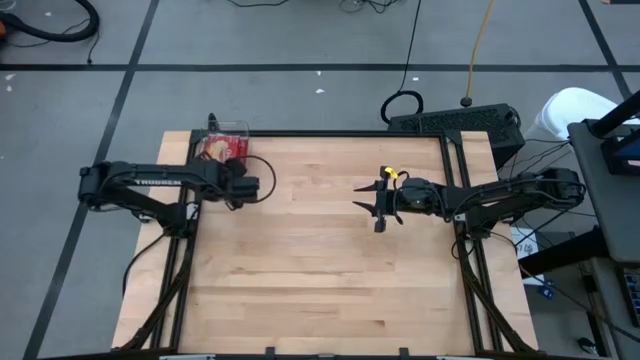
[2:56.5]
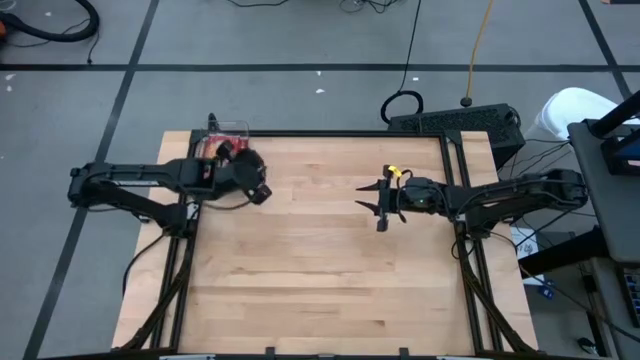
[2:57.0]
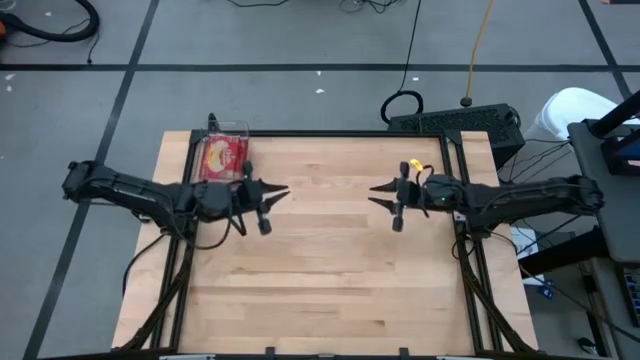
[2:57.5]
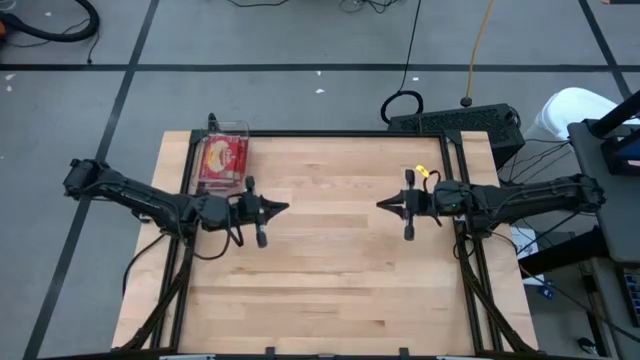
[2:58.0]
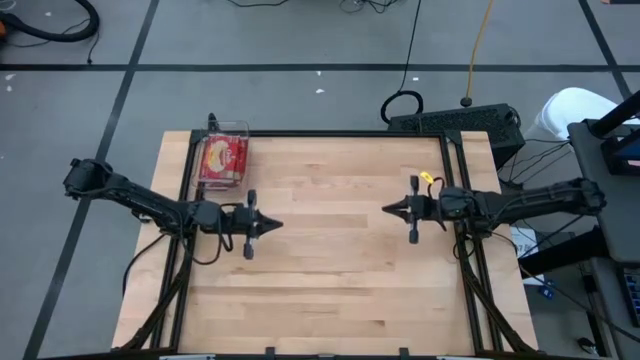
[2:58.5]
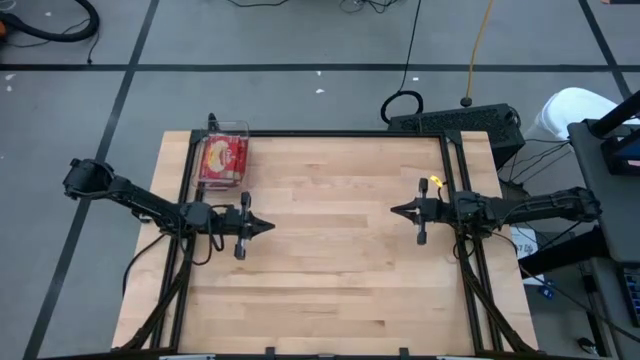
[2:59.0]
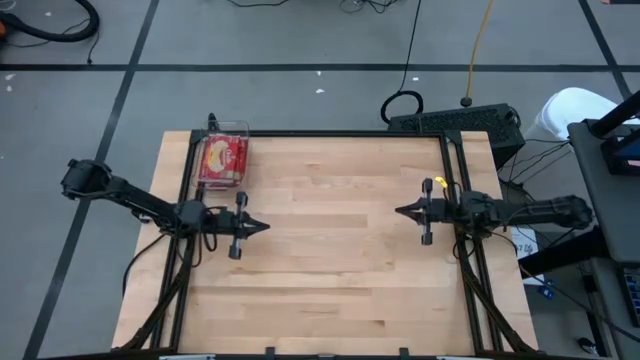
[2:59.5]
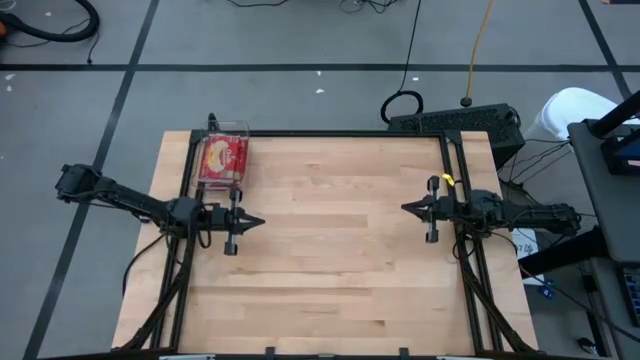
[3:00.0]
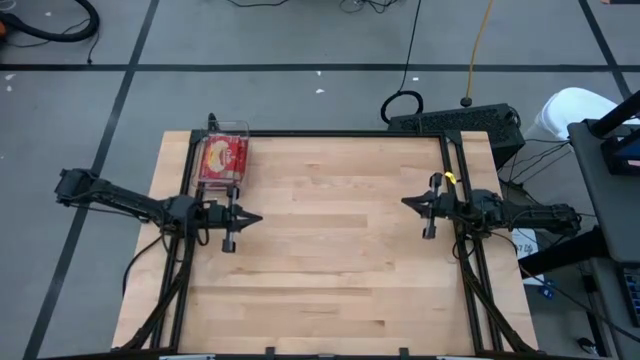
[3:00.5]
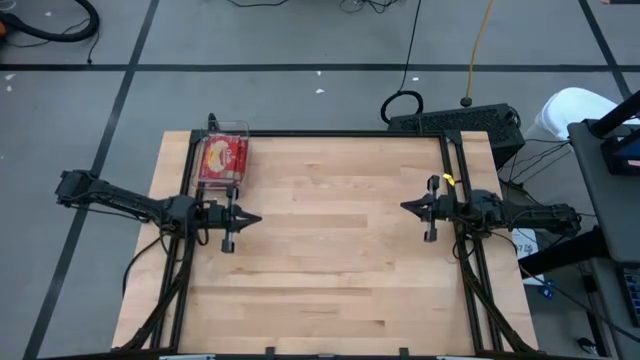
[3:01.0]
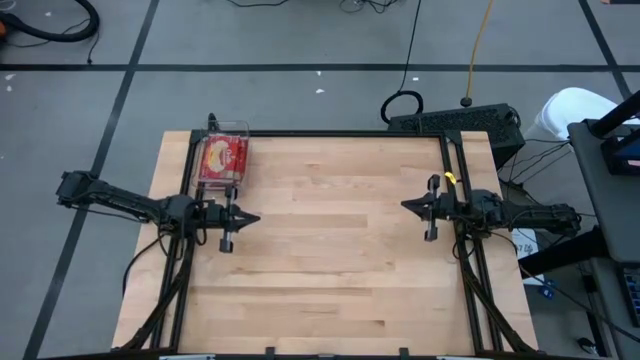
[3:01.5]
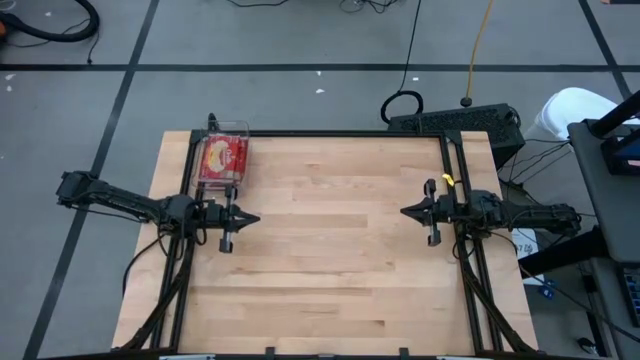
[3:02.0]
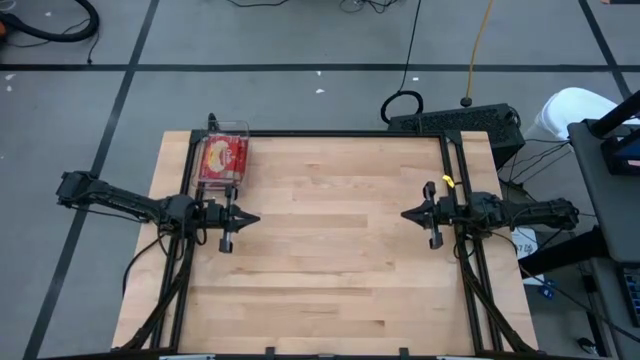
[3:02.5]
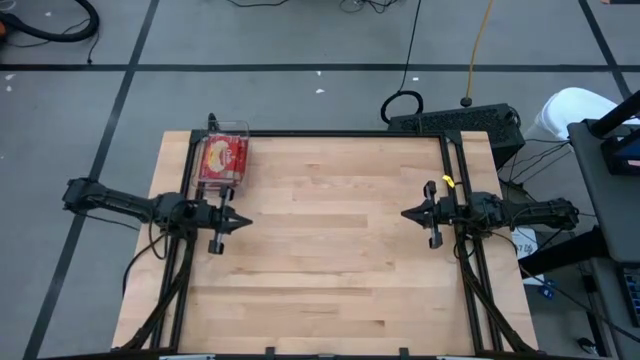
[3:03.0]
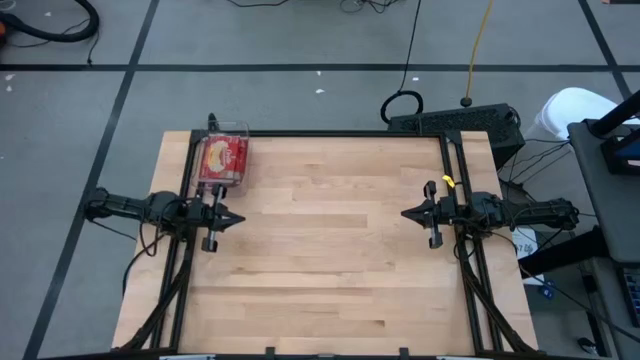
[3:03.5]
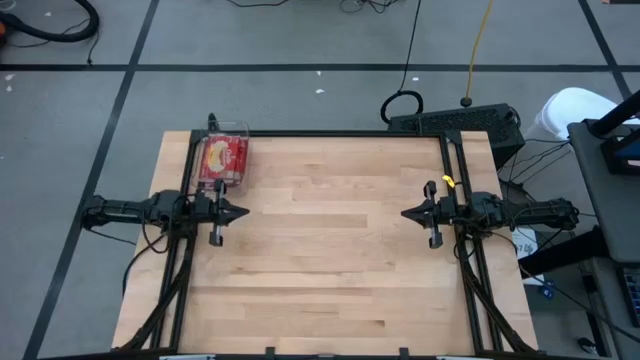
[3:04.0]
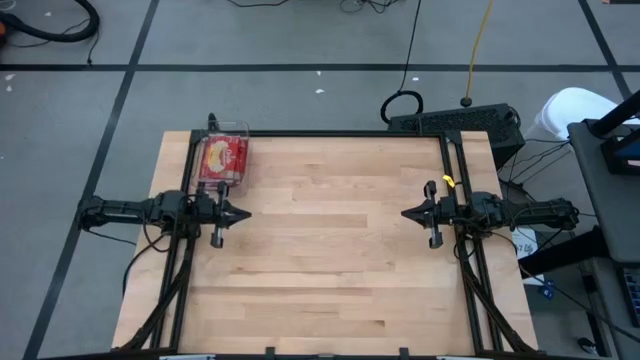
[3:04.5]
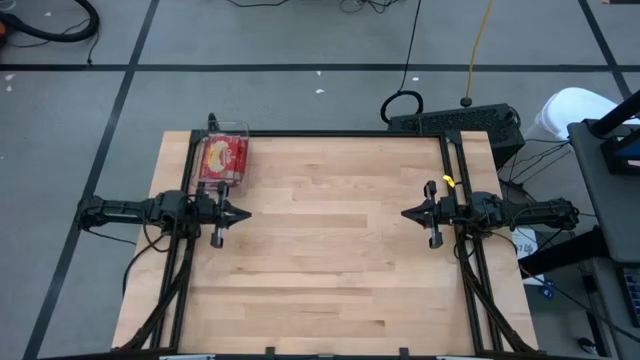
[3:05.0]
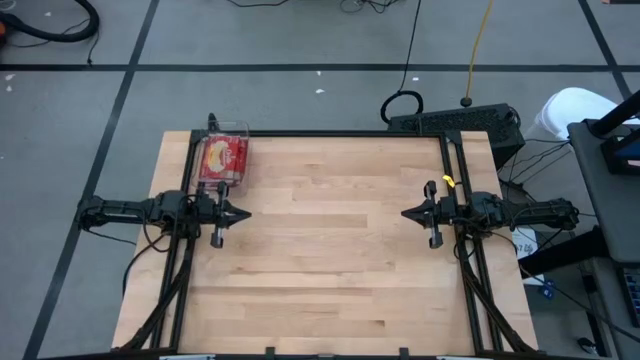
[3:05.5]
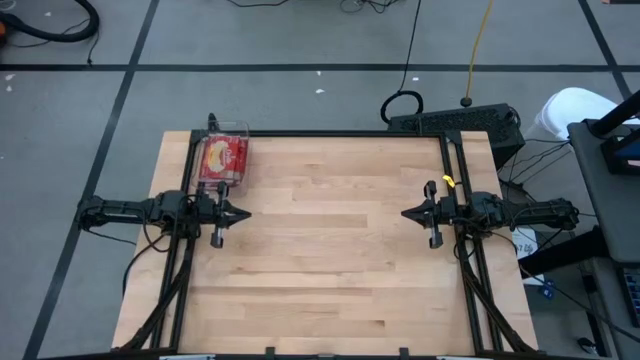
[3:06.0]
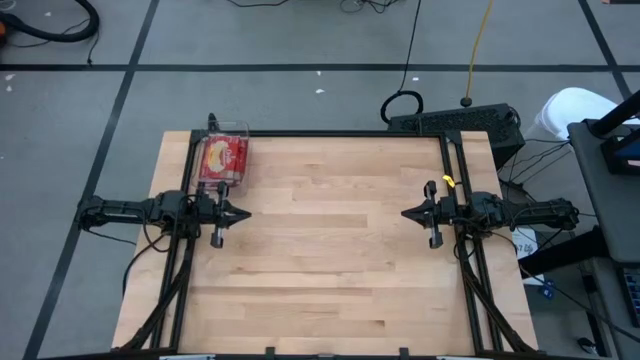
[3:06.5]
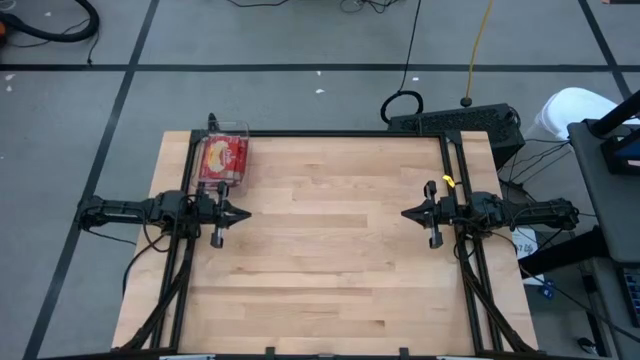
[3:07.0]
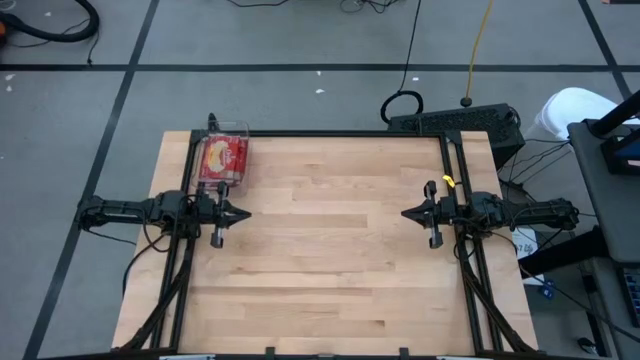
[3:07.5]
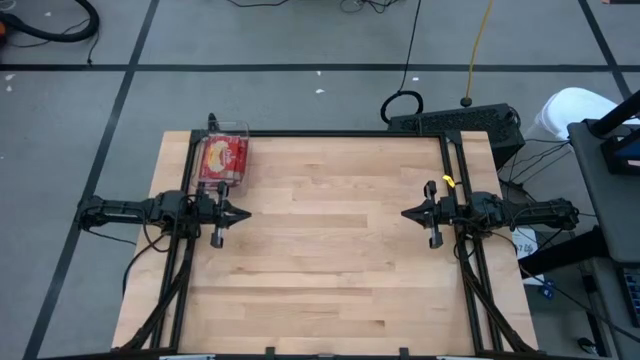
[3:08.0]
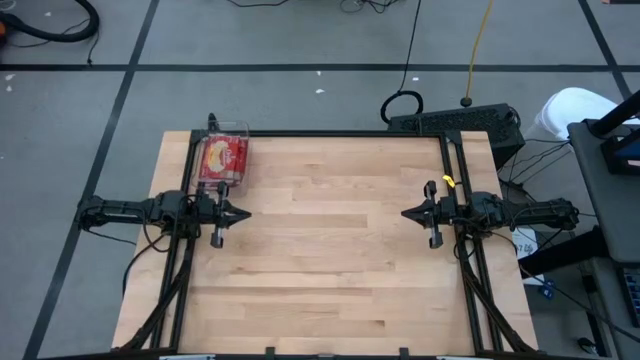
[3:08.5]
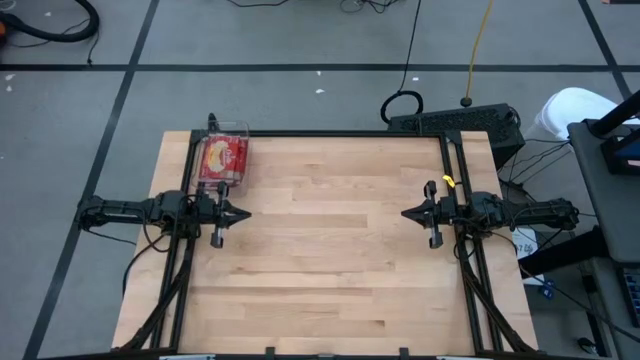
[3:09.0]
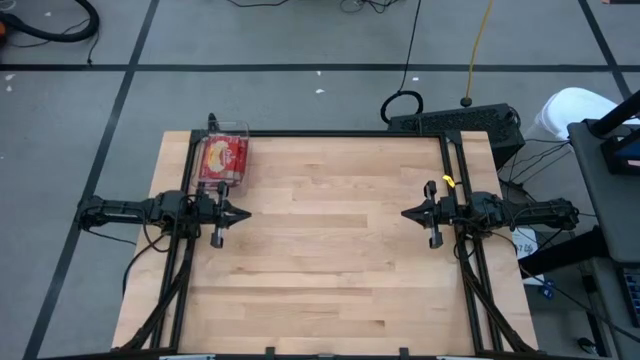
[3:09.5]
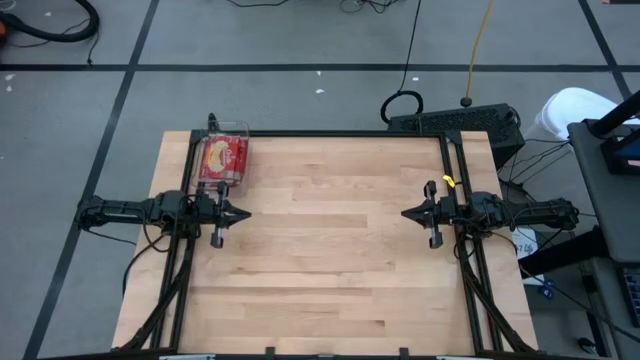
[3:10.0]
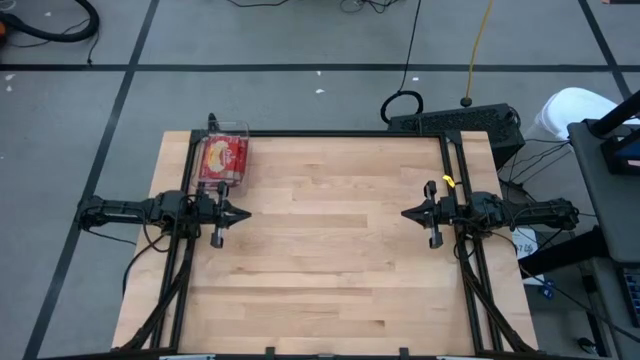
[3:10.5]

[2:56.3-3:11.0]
Task: Sort popcorn bags into baskets
Return to Home Position

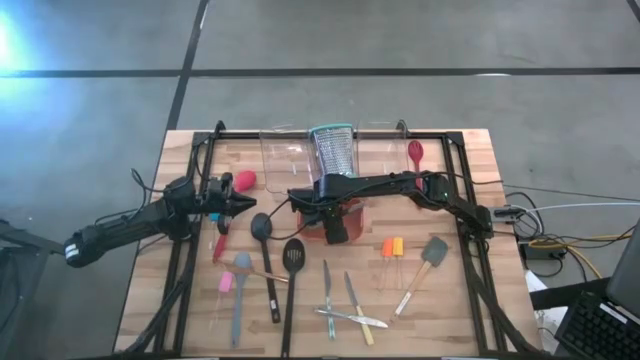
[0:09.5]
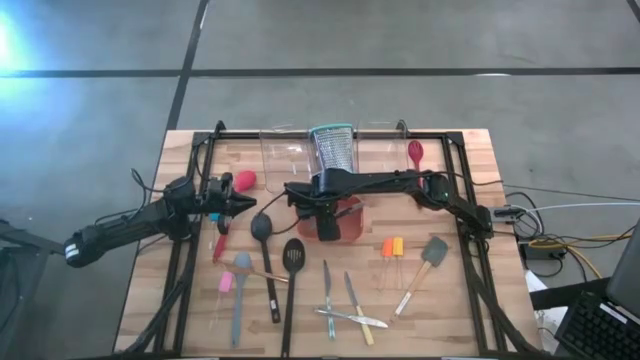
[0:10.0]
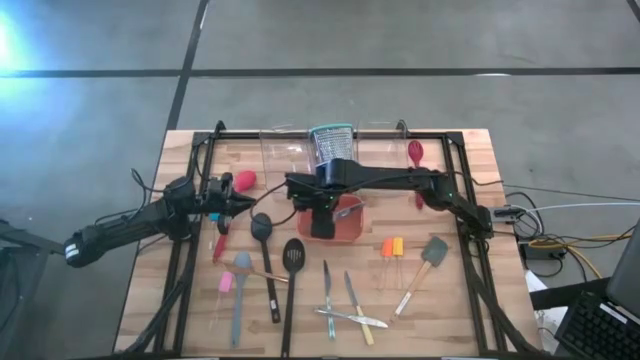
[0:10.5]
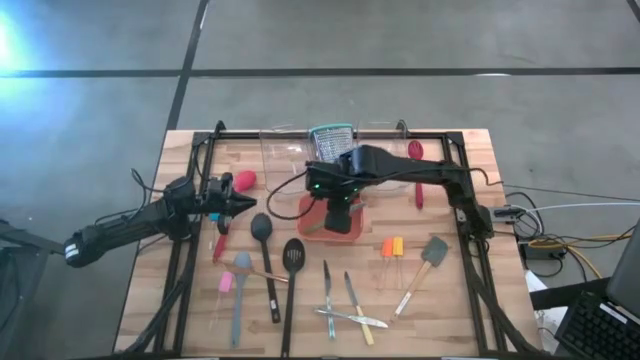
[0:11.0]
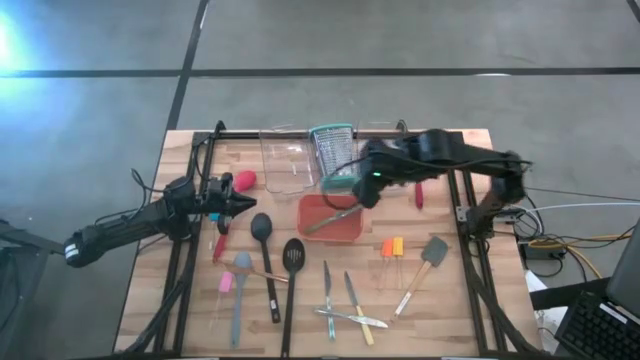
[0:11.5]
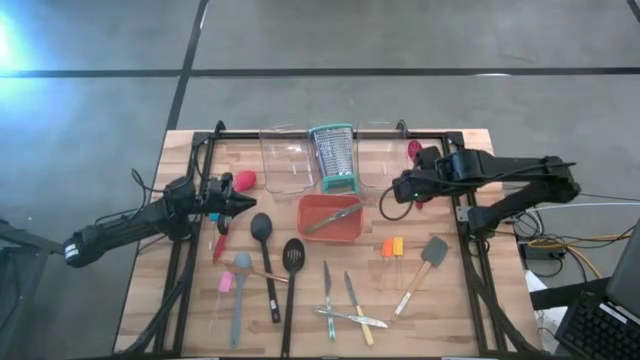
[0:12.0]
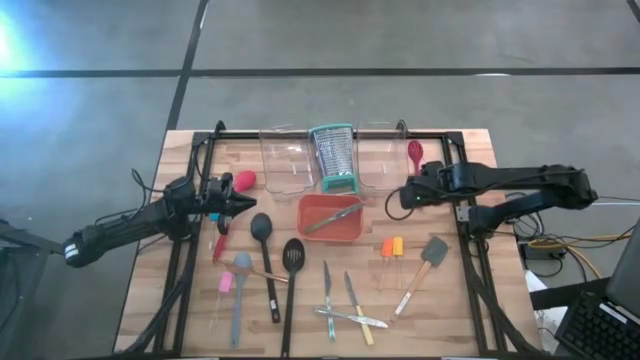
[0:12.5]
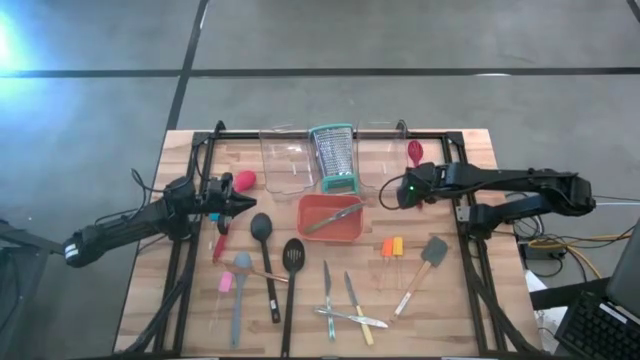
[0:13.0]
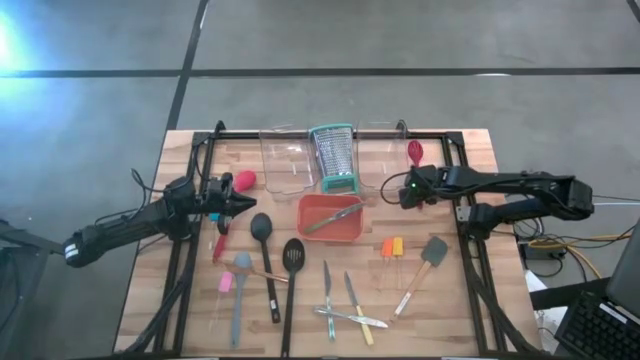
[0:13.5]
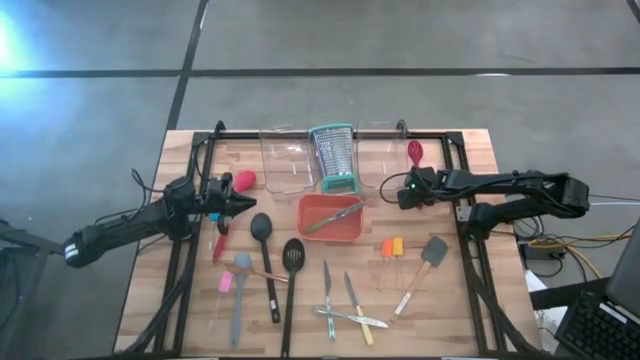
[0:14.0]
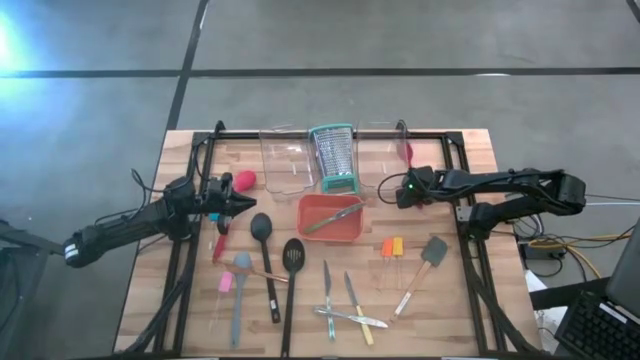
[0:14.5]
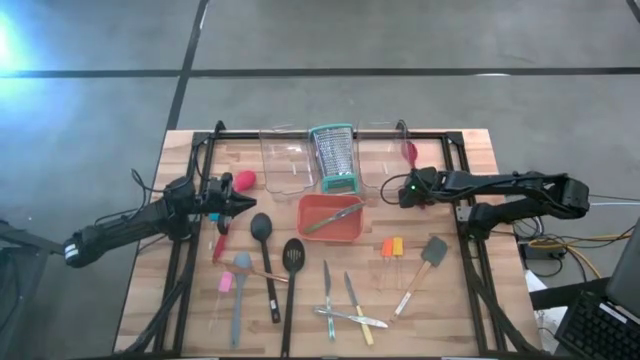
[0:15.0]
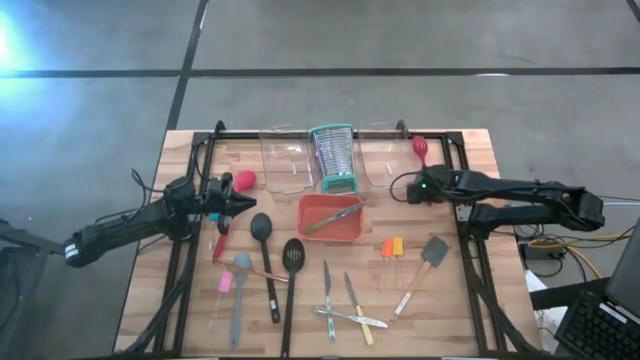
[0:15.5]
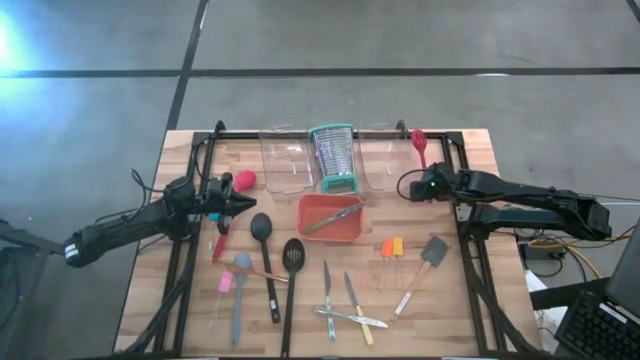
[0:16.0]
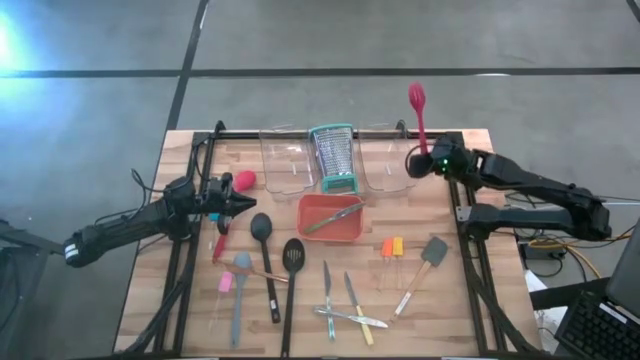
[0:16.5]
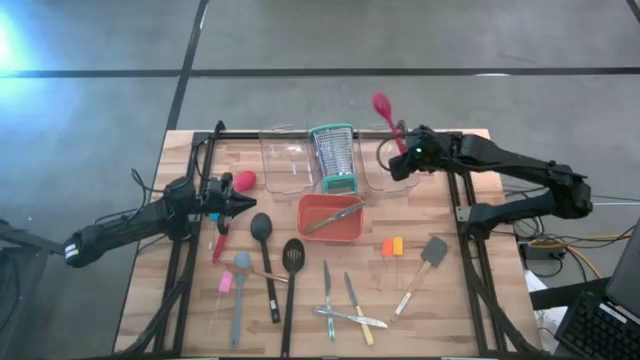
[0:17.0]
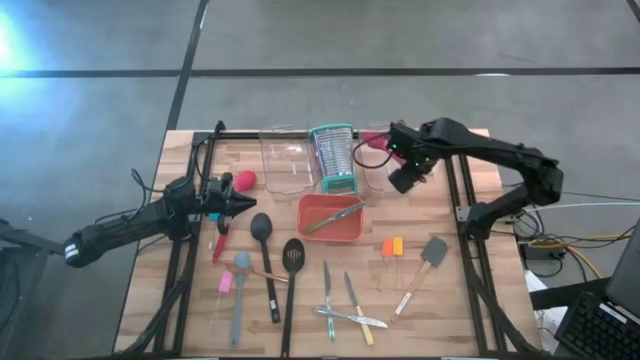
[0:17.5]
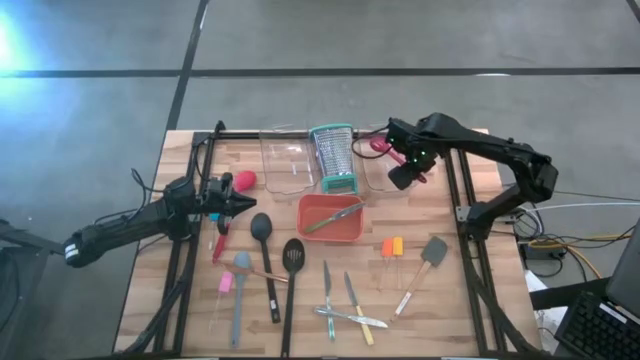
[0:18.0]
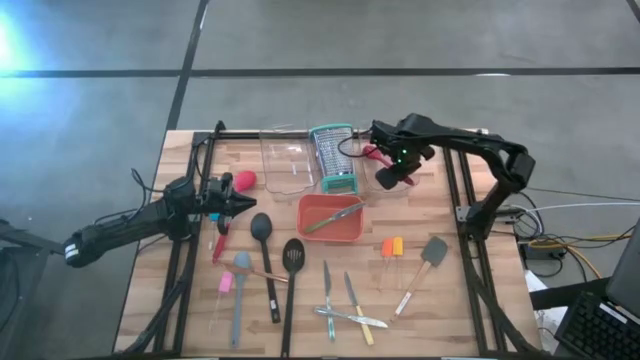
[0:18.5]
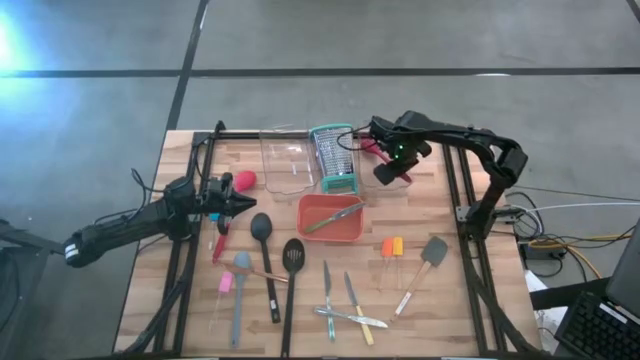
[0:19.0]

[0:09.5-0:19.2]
Task: Pick & Place Kitchen Items
Put the red slotted spoon into the right transparent bin
